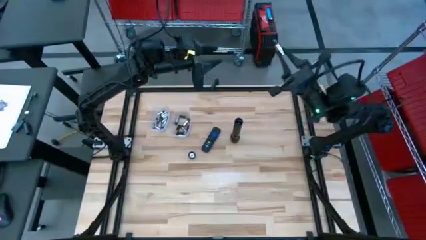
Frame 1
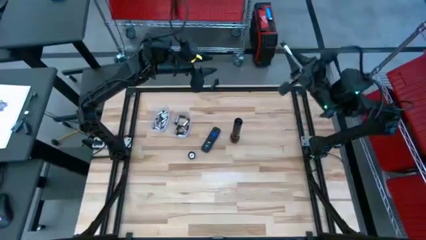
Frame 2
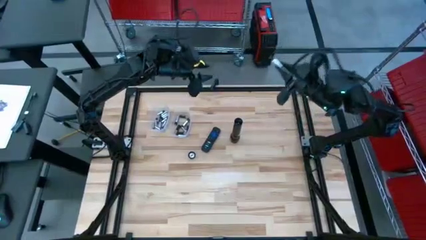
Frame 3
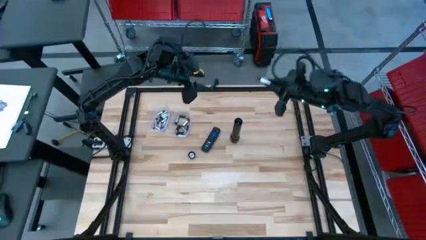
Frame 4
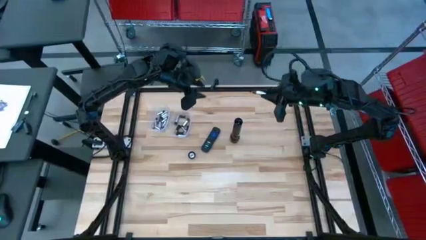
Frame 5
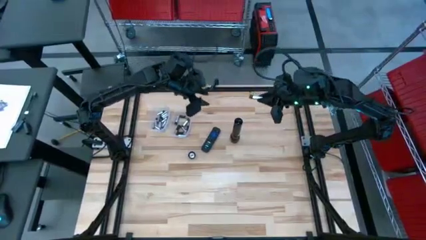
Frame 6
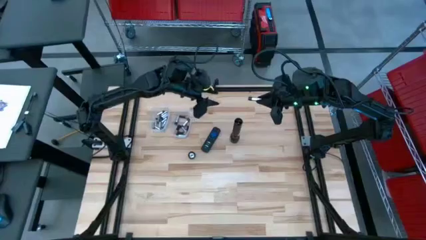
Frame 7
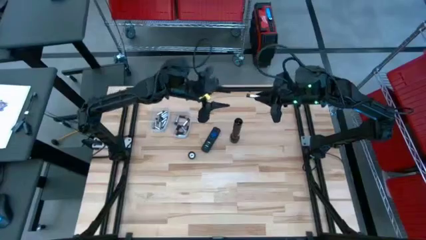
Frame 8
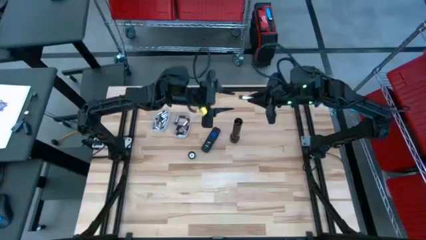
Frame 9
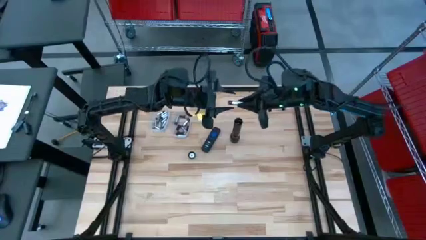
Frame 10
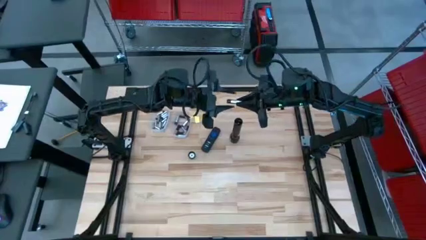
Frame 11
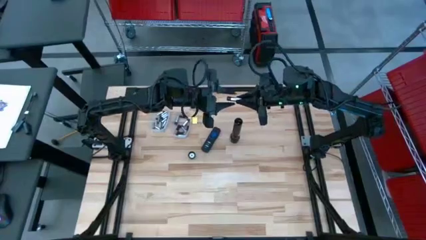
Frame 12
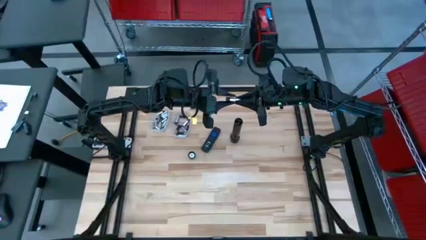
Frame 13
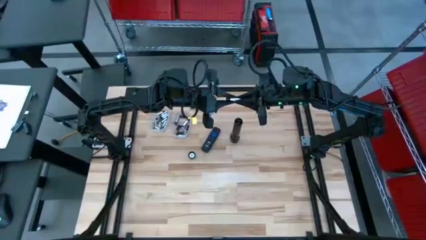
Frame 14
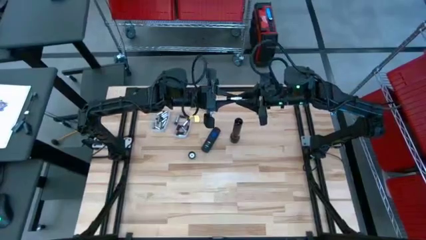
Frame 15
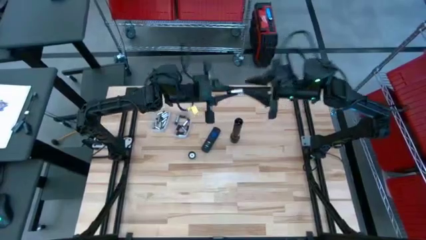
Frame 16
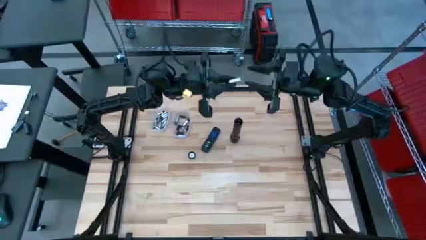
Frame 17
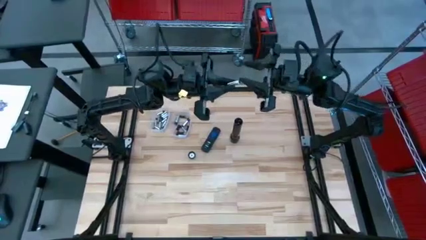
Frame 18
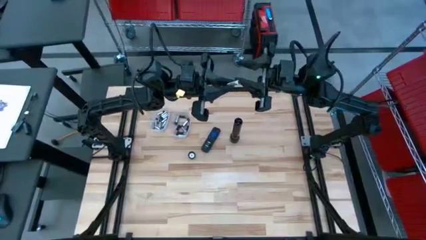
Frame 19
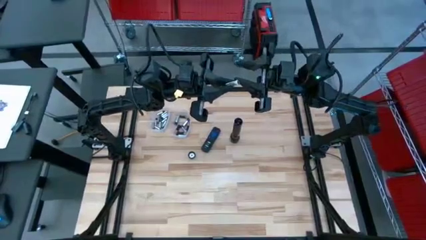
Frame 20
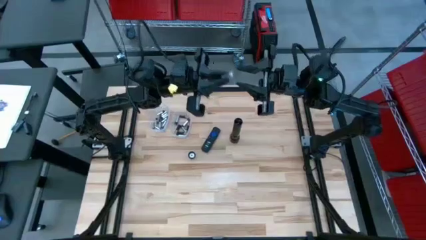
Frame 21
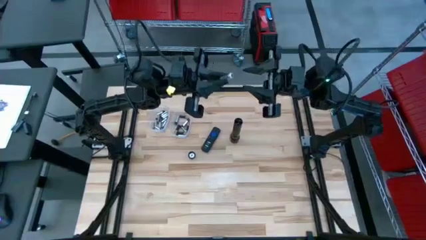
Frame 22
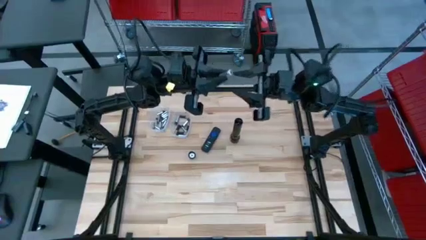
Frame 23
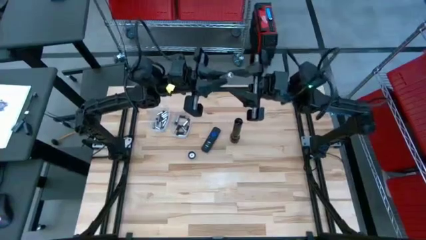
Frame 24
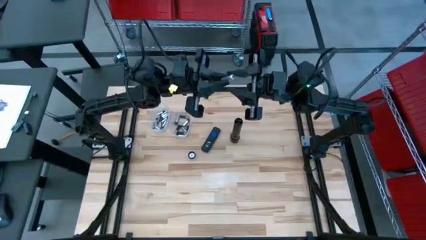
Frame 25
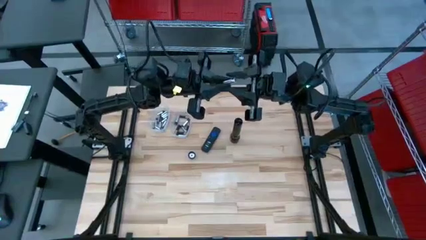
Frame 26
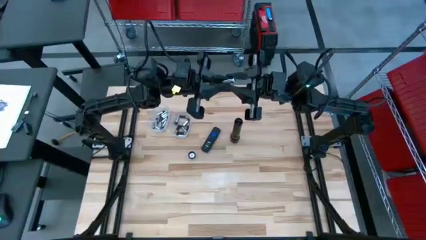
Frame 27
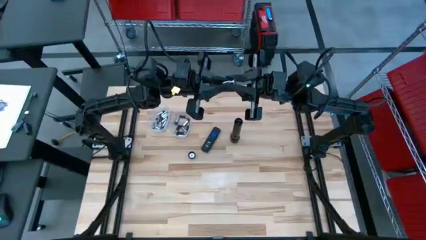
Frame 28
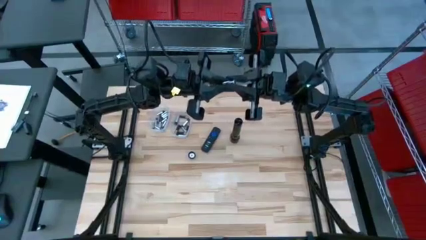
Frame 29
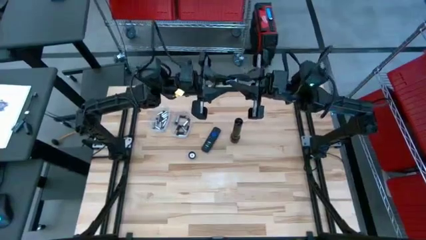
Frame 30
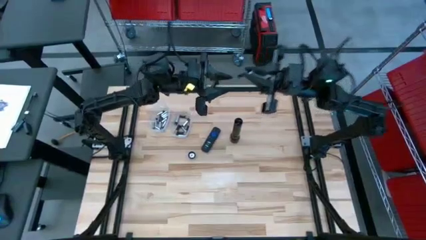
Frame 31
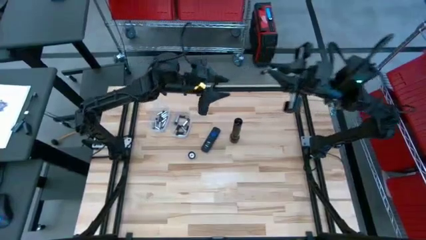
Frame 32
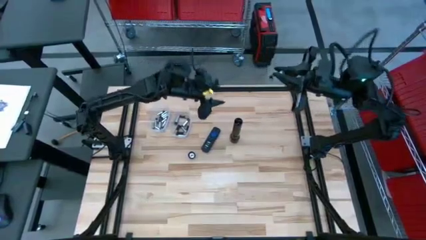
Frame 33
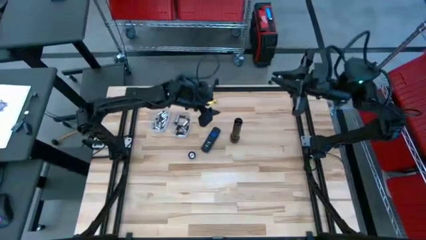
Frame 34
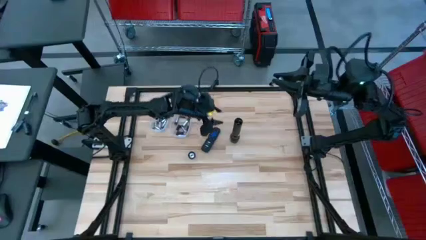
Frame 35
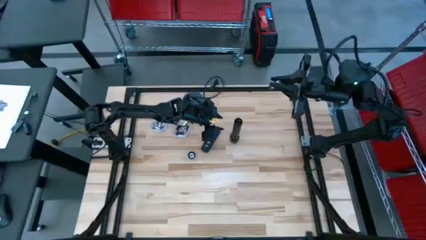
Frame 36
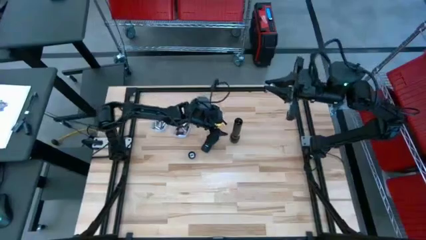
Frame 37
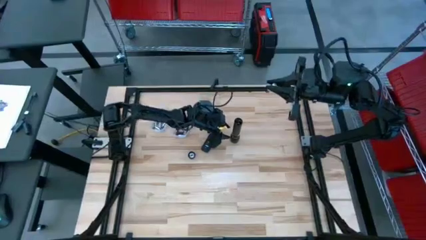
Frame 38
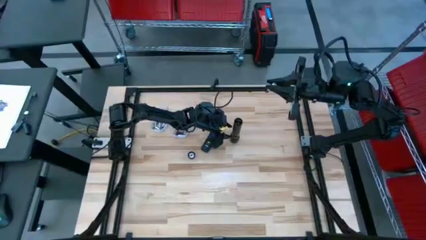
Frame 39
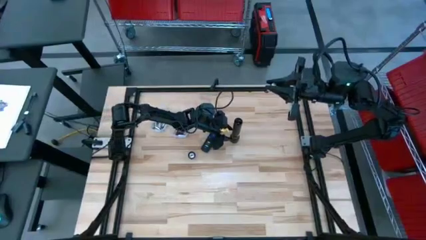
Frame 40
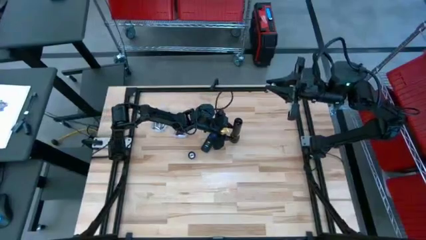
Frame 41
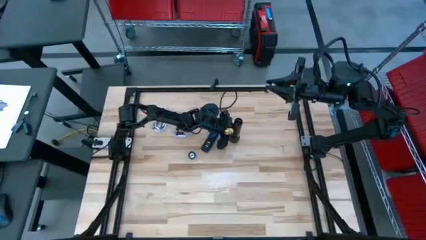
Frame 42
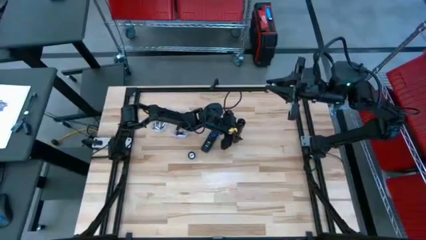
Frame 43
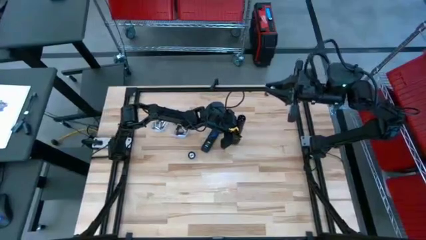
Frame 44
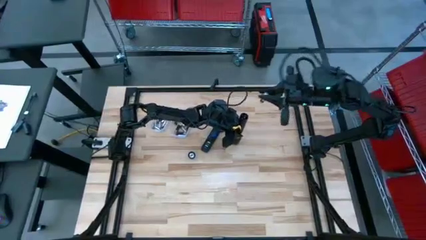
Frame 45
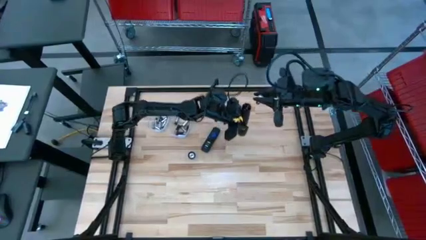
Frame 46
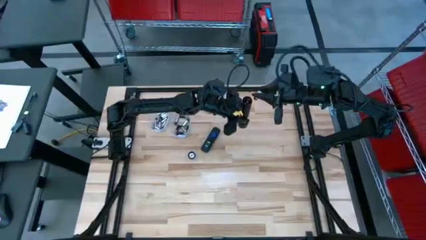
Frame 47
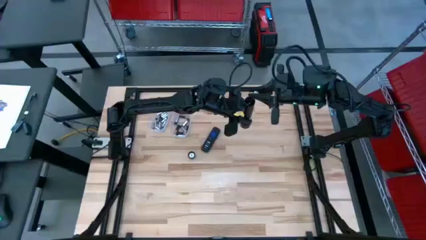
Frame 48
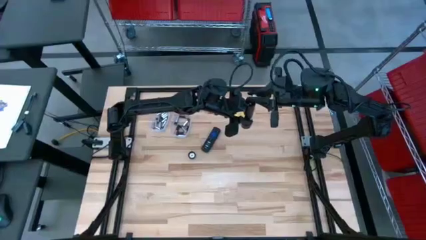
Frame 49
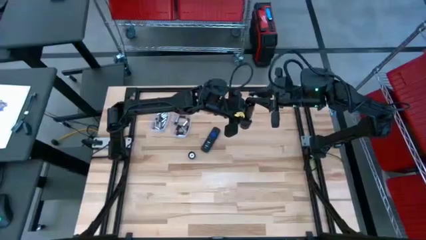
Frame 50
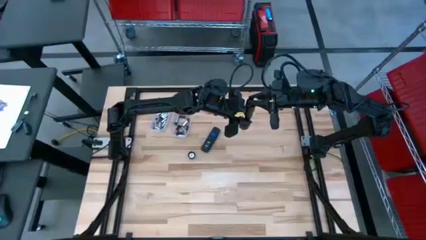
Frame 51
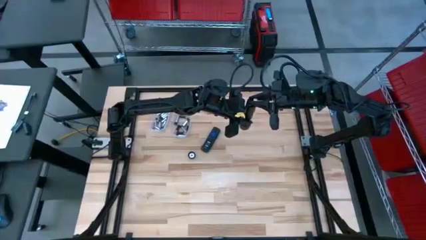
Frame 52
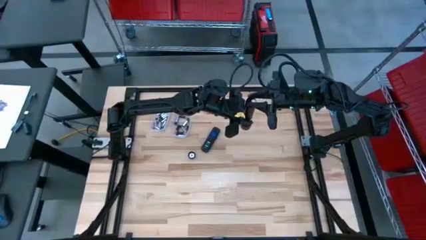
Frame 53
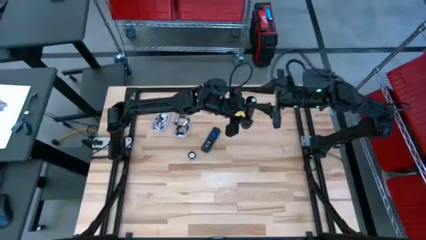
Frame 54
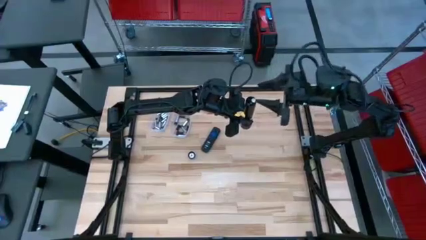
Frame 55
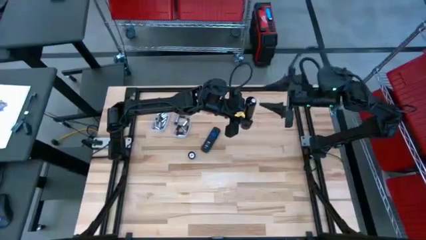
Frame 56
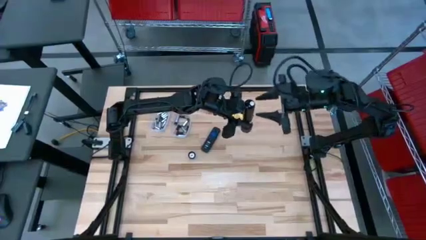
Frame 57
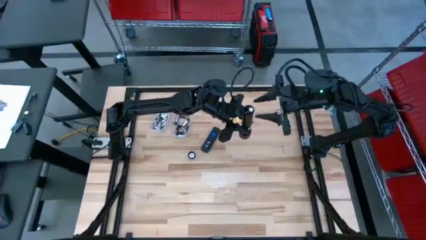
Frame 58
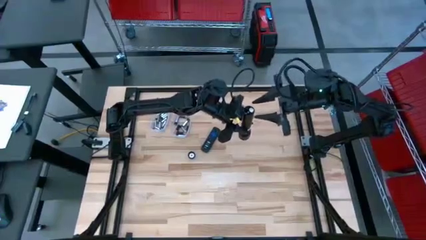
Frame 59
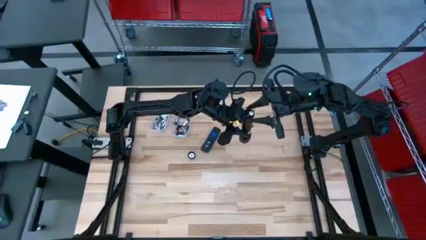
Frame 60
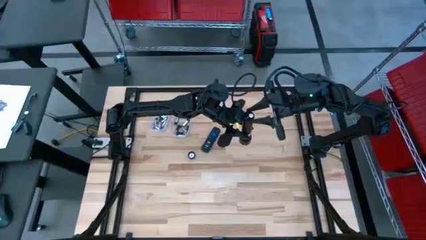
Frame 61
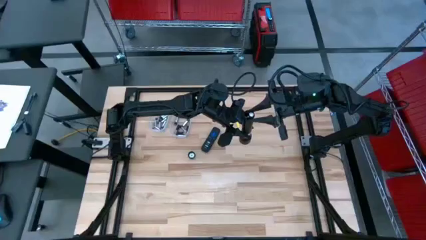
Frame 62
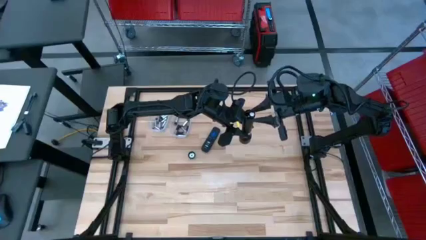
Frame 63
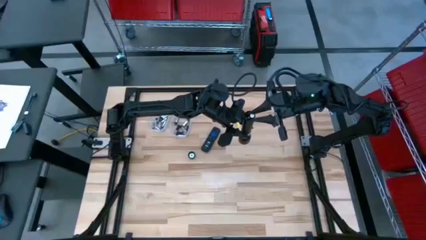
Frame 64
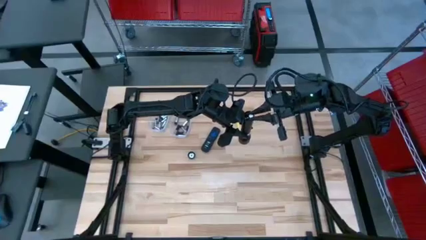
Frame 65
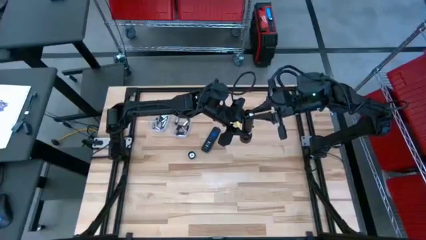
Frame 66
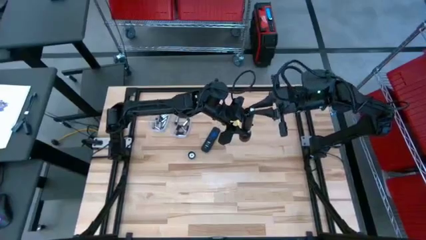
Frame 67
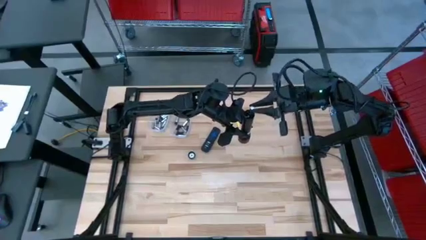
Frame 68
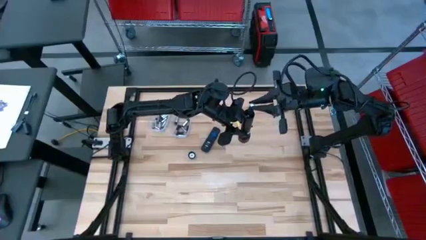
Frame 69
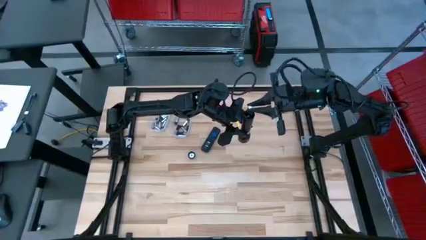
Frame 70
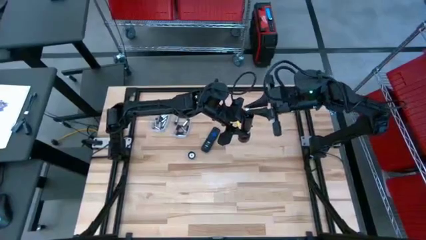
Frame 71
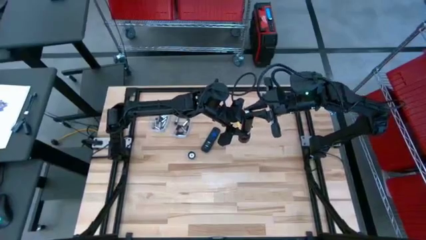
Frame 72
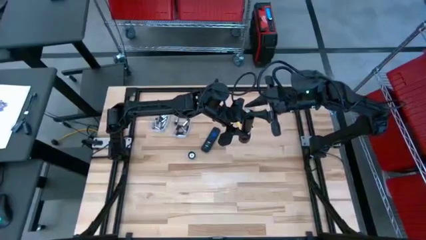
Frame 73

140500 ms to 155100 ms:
Task: Insert battery
Insert the silver battery into the flashlight battery compartment

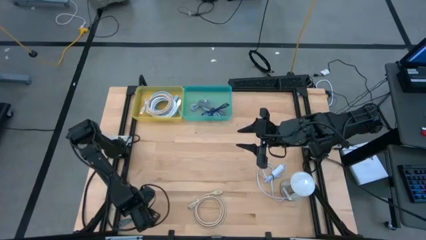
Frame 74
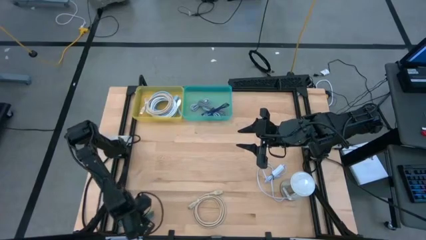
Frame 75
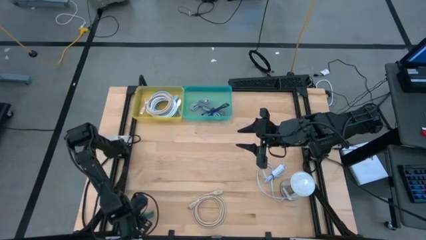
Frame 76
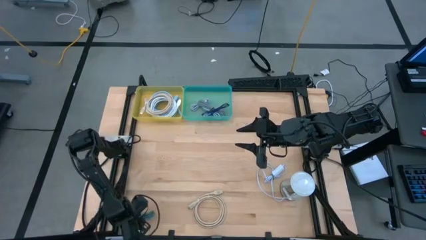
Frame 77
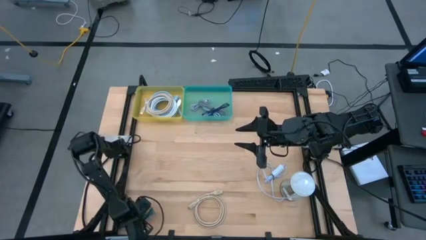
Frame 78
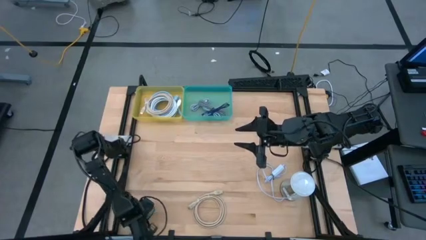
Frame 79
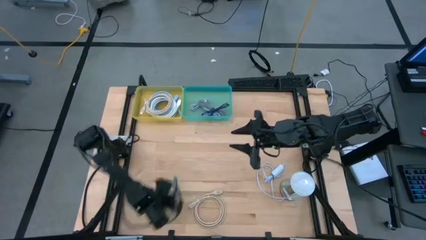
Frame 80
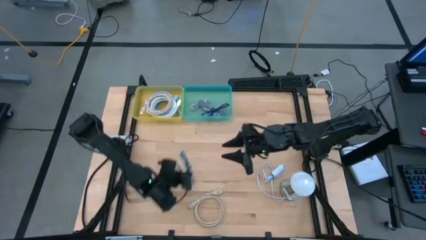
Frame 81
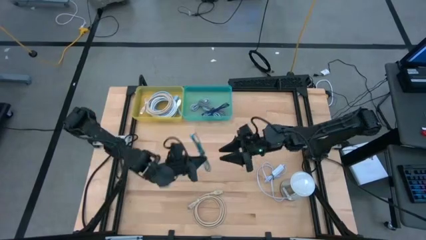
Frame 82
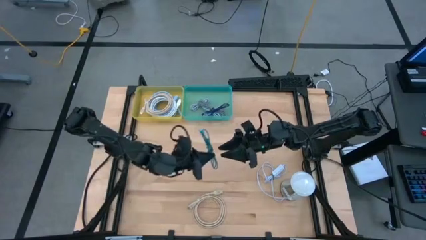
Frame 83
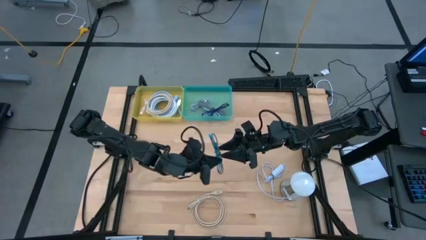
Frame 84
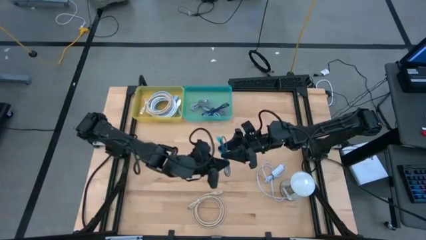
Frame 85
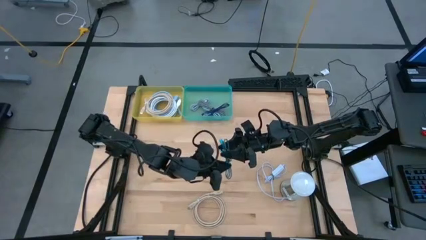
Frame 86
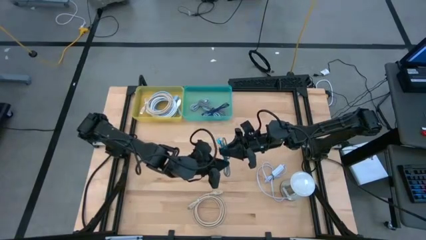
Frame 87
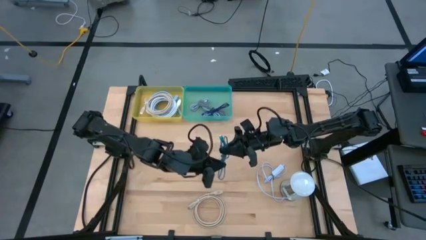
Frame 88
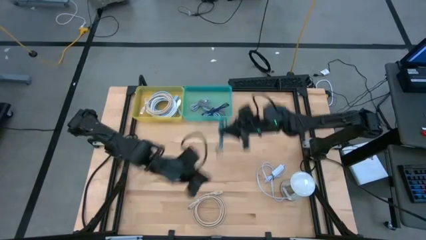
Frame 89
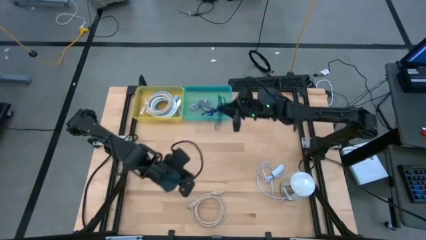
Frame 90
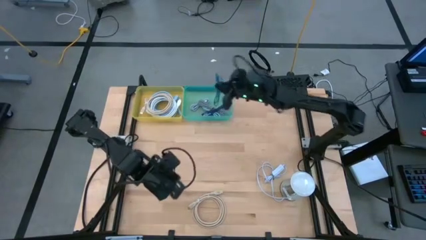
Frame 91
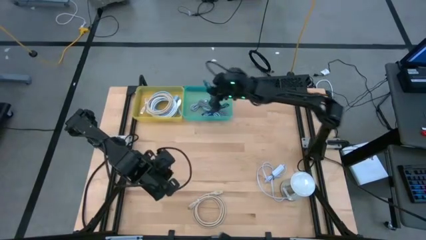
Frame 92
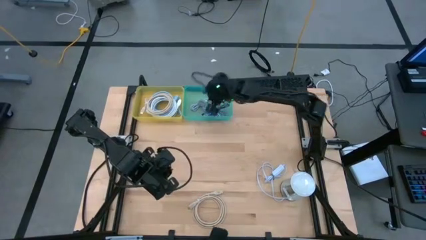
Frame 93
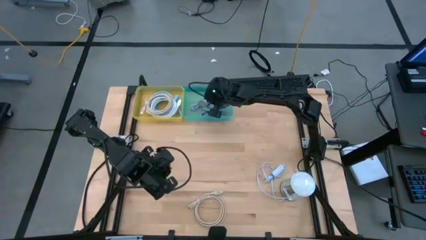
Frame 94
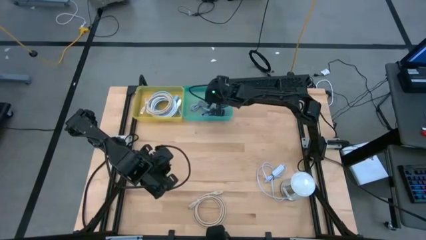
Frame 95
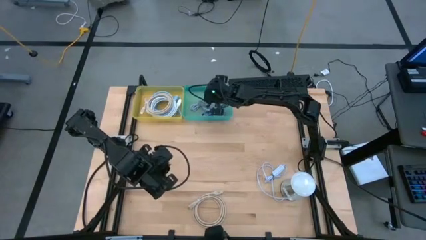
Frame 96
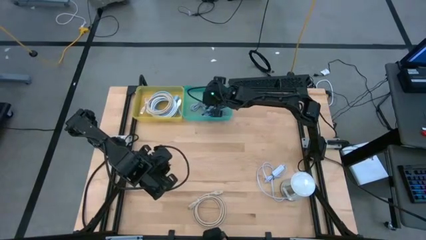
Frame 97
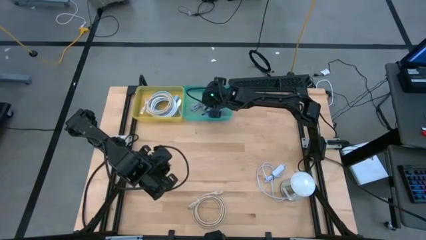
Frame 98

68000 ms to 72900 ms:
Task: Pick & Place USB Port
Put the blue charger cable into the green bin
